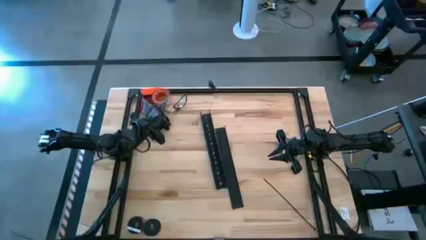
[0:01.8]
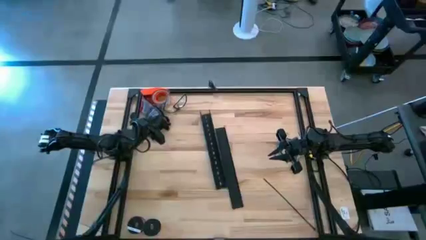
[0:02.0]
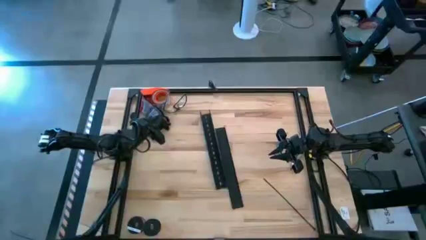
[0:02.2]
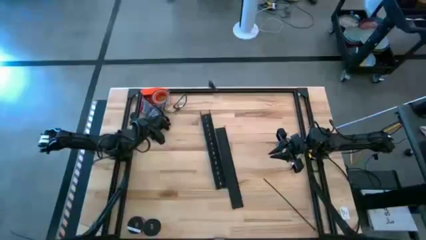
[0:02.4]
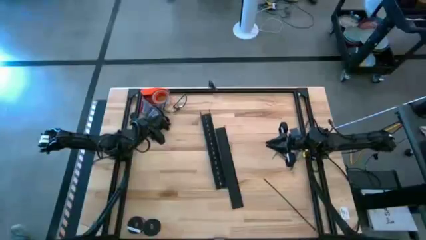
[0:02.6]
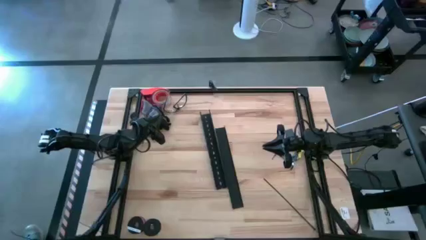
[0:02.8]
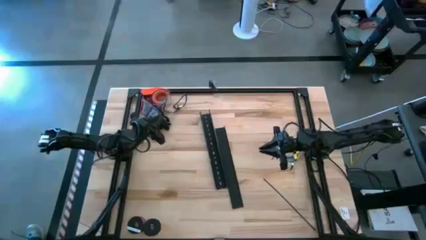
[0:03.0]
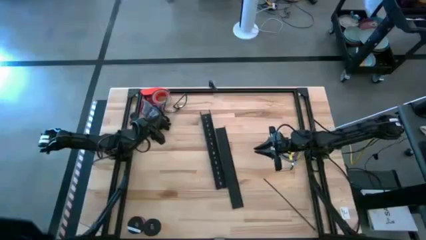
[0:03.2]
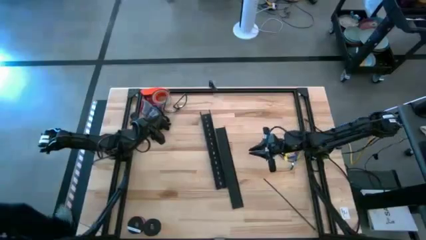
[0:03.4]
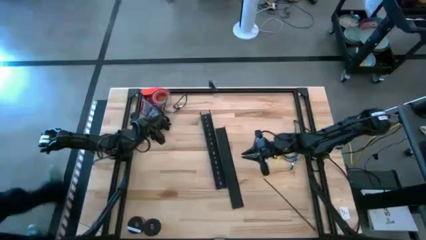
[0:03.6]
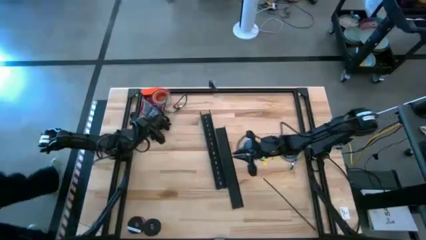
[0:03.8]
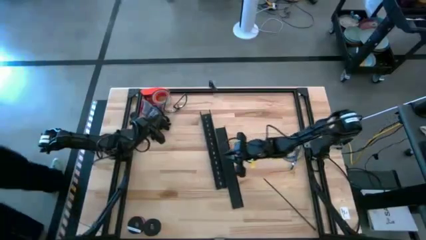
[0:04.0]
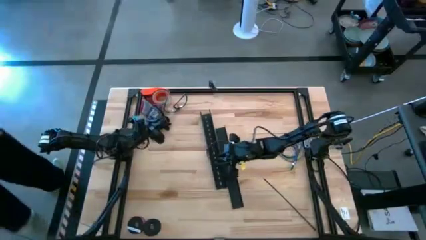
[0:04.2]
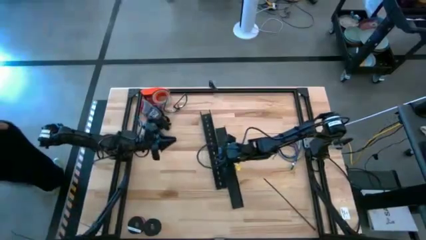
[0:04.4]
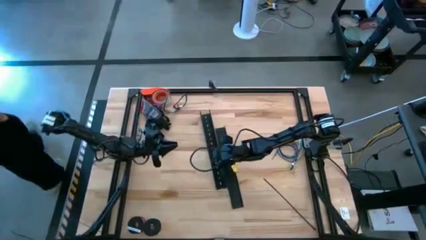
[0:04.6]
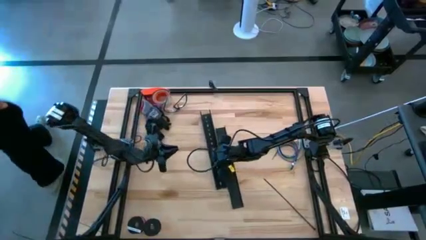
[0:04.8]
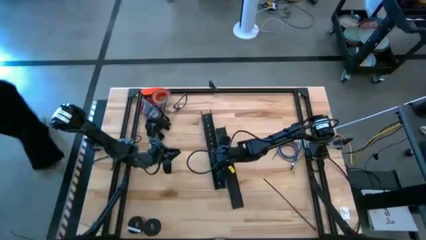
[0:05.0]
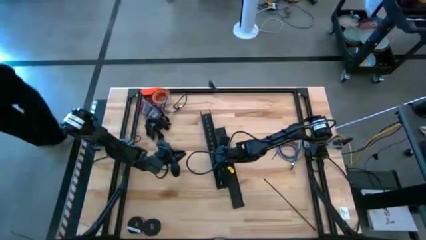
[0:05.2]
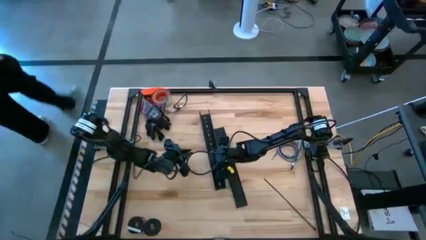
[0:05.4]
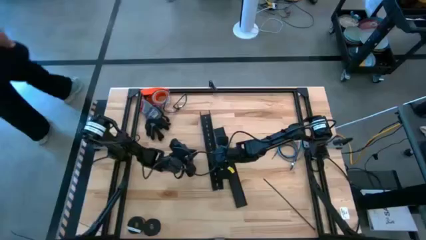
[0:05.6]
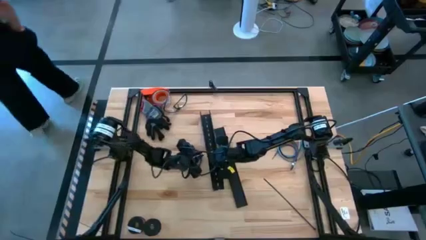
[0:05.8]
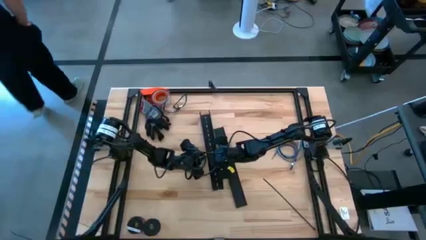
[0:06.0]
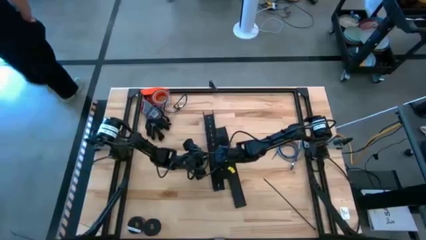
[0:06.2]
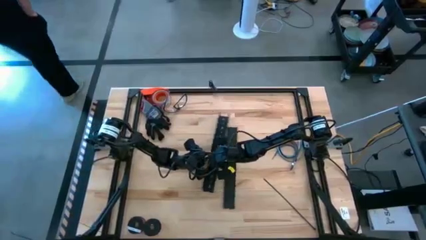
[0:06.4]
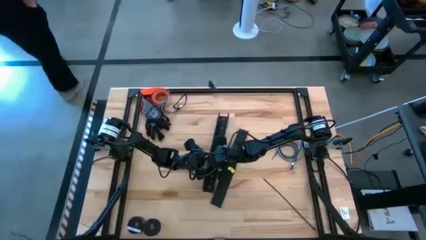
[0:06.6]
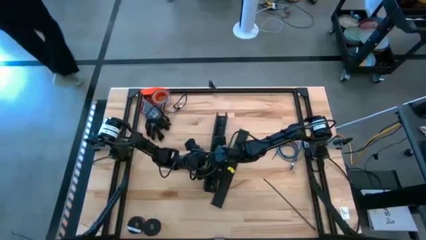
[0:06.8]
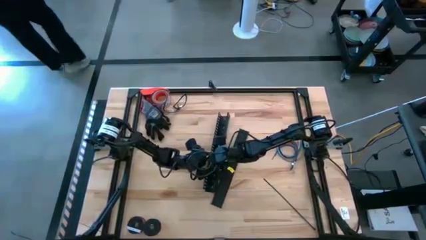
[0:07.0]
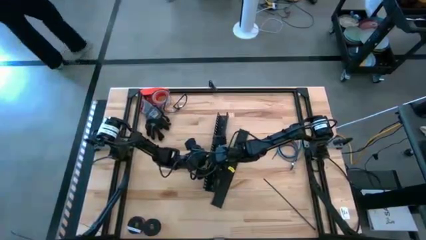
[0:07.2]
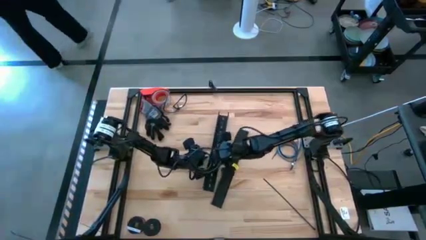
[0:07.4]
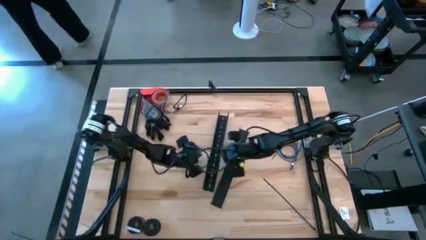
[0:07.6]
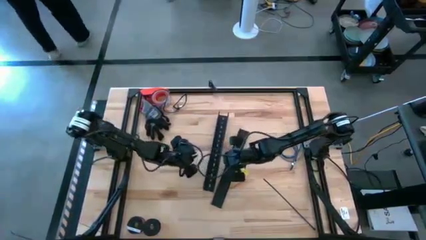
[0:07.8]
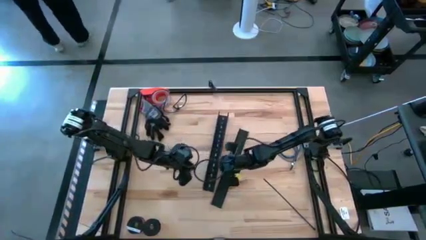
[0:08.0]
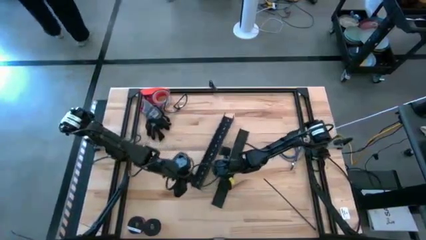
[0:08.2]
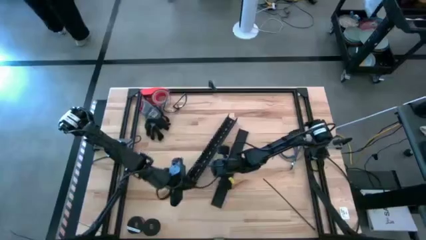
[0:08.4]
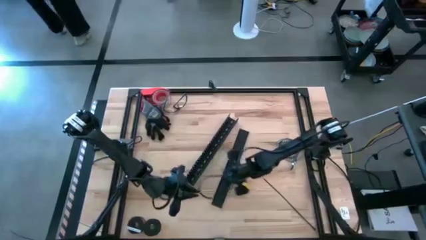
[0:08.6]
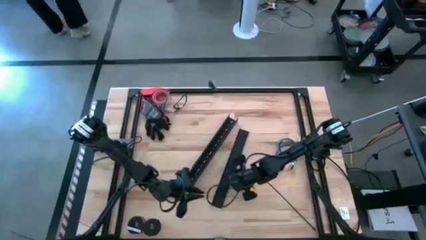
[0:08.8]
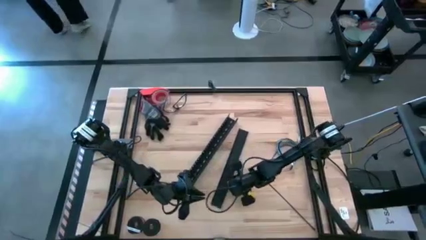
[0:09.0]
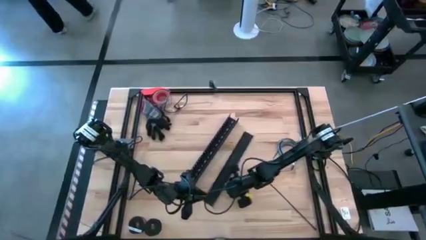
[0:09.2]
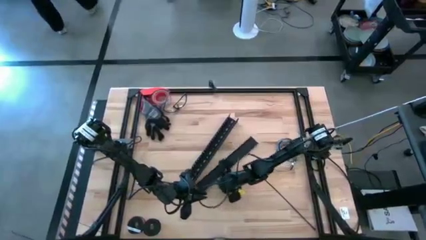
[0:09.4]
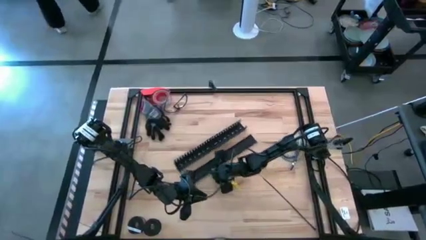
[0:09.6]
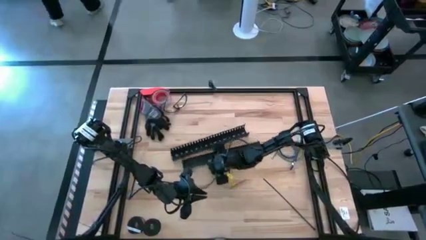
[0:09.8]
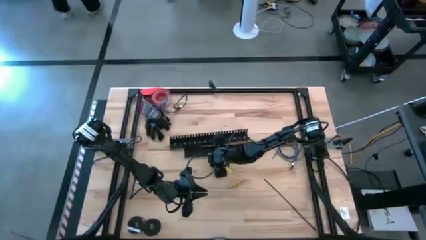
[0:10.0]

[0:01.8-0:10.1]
Task: Ziptie cables
Prepare the black cable duct

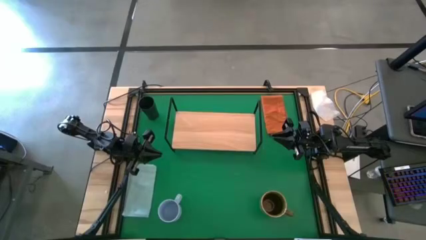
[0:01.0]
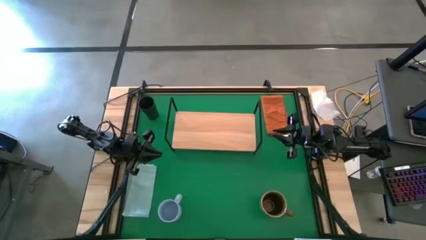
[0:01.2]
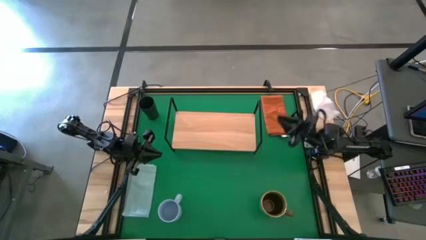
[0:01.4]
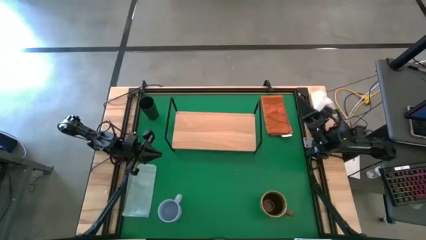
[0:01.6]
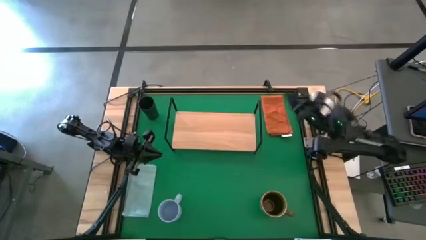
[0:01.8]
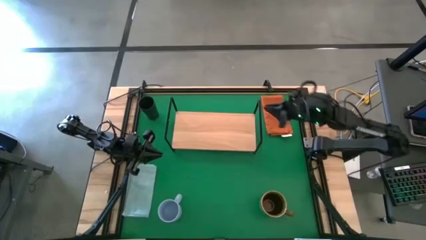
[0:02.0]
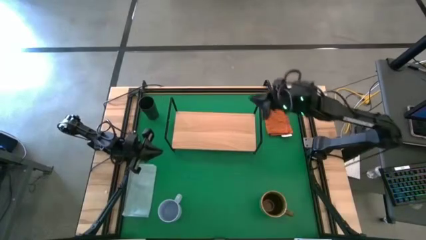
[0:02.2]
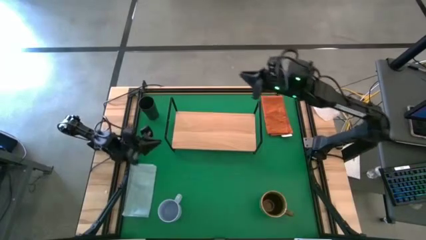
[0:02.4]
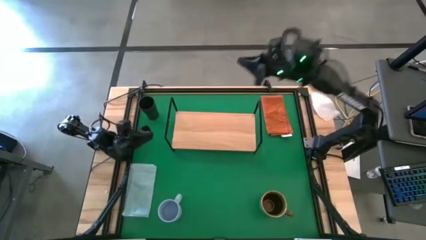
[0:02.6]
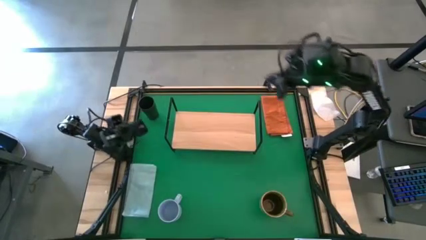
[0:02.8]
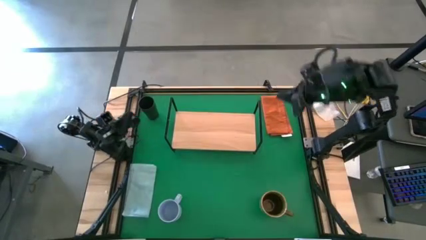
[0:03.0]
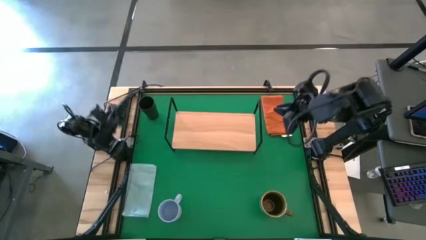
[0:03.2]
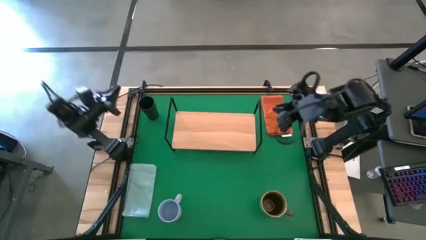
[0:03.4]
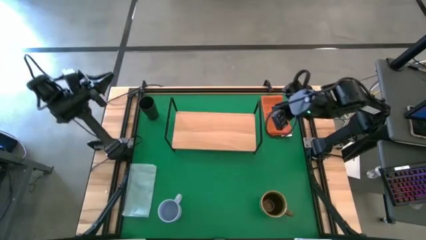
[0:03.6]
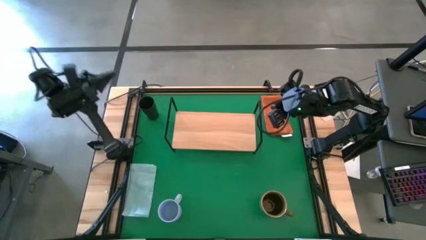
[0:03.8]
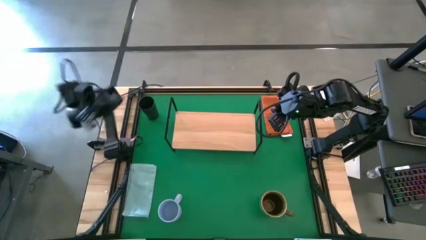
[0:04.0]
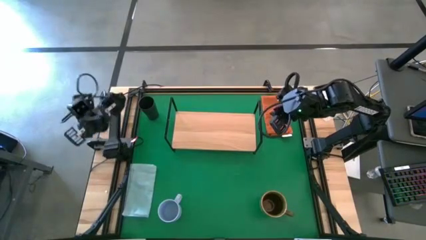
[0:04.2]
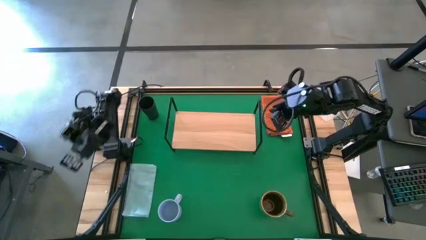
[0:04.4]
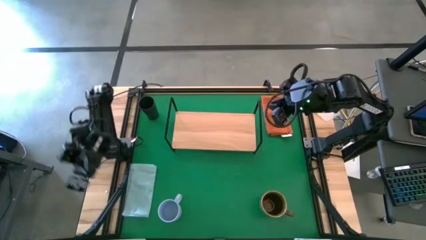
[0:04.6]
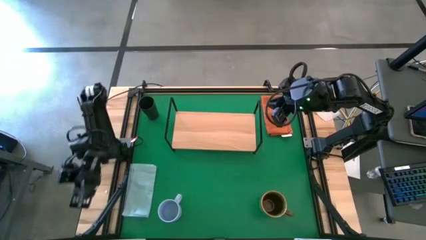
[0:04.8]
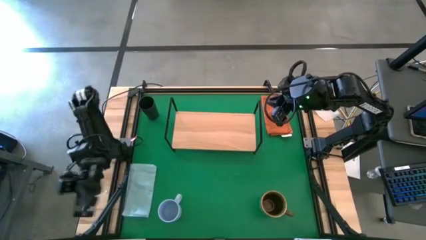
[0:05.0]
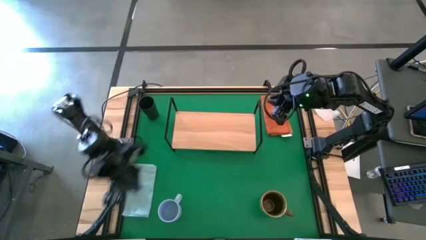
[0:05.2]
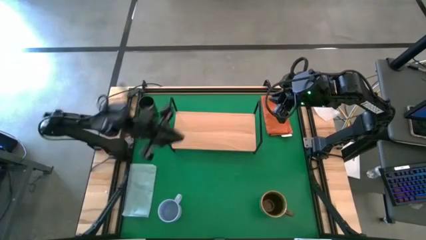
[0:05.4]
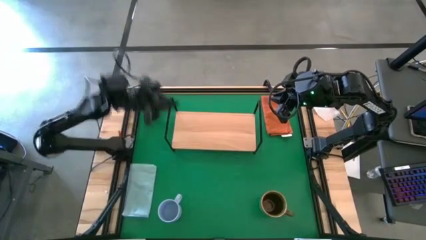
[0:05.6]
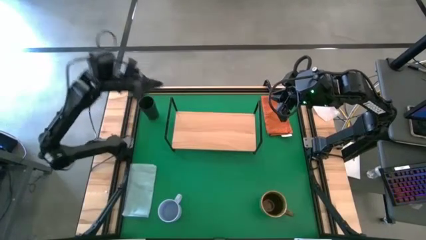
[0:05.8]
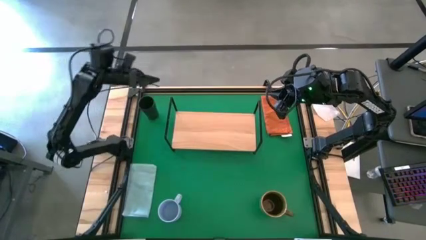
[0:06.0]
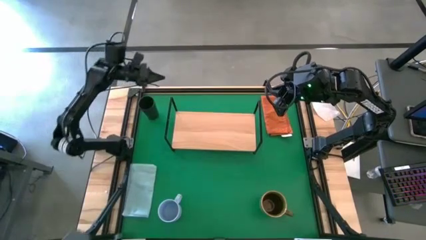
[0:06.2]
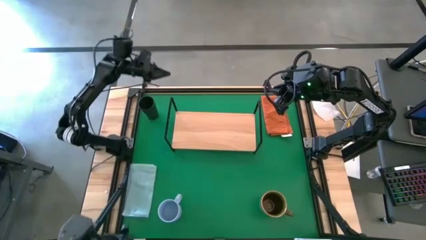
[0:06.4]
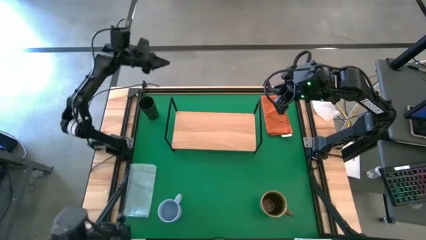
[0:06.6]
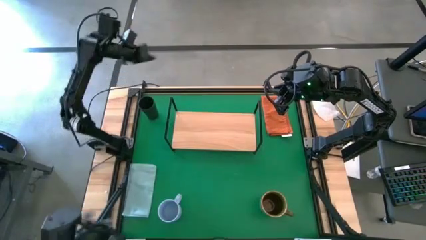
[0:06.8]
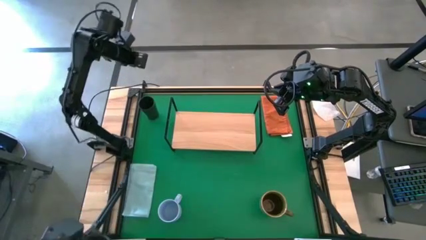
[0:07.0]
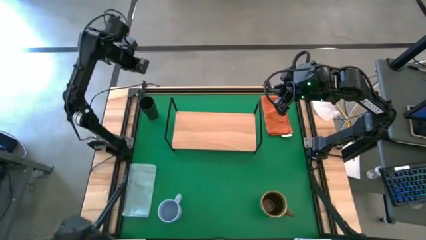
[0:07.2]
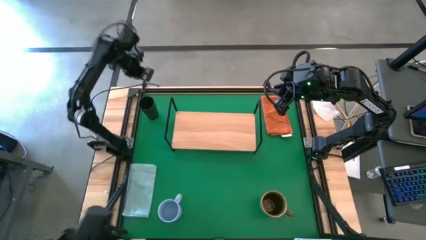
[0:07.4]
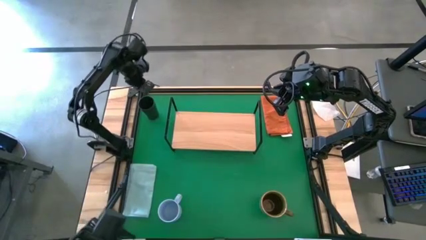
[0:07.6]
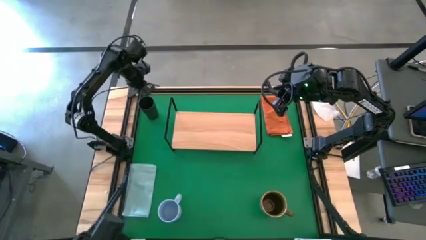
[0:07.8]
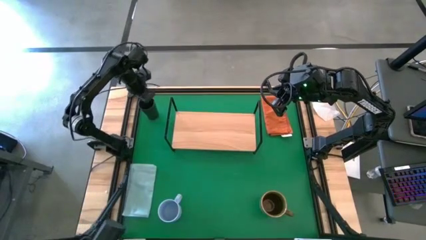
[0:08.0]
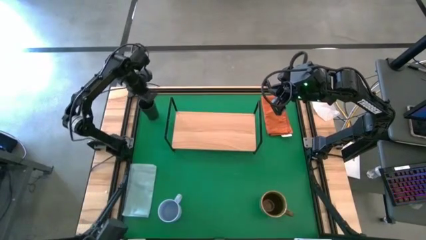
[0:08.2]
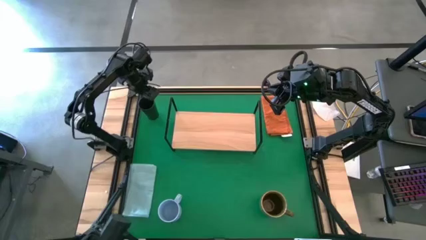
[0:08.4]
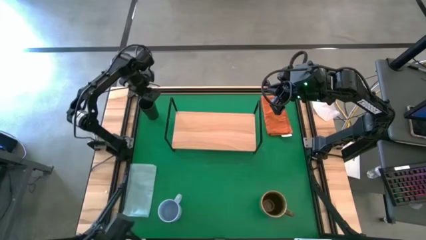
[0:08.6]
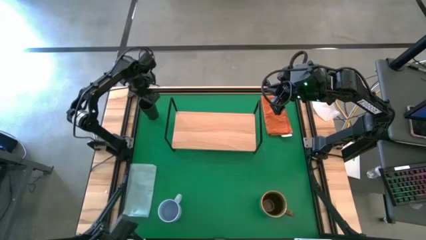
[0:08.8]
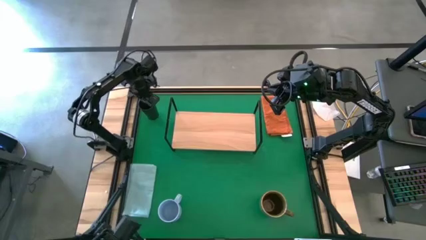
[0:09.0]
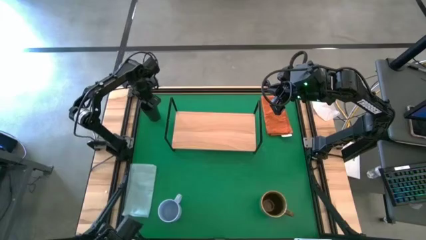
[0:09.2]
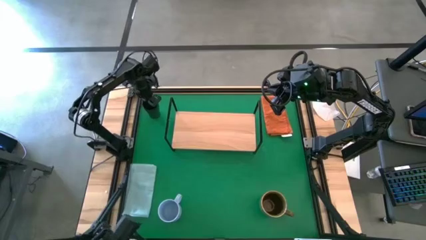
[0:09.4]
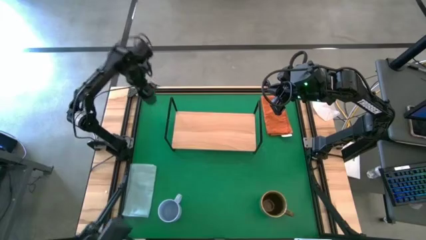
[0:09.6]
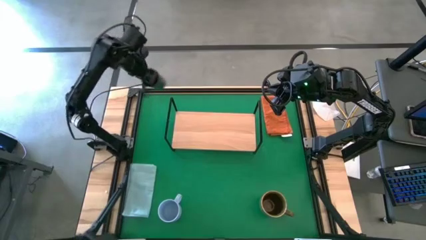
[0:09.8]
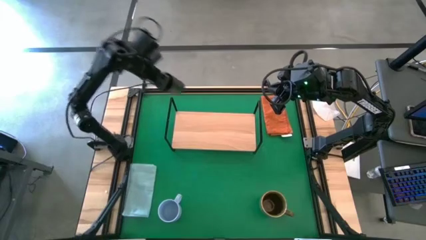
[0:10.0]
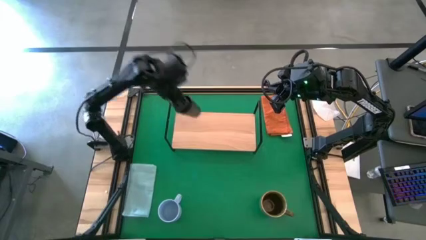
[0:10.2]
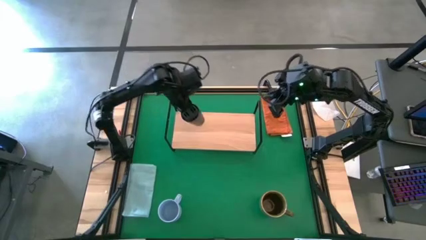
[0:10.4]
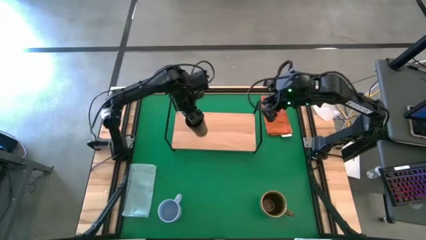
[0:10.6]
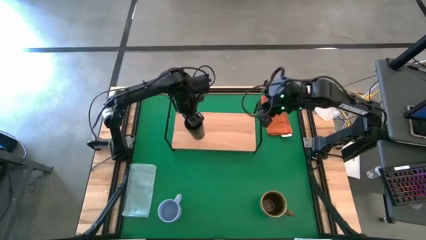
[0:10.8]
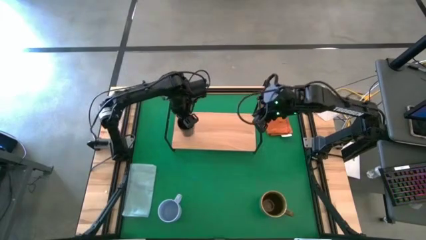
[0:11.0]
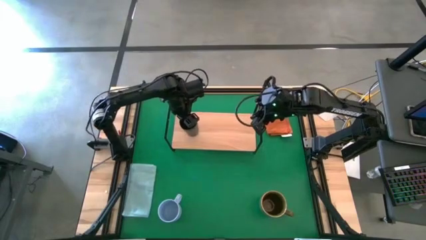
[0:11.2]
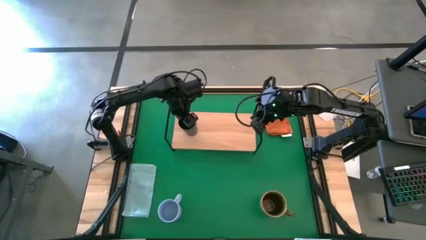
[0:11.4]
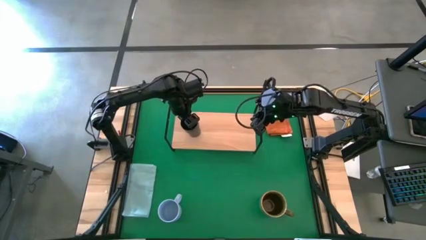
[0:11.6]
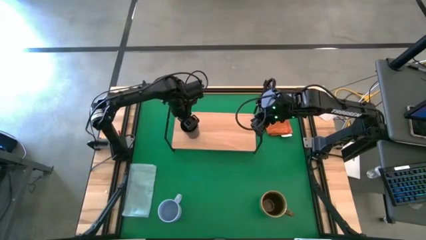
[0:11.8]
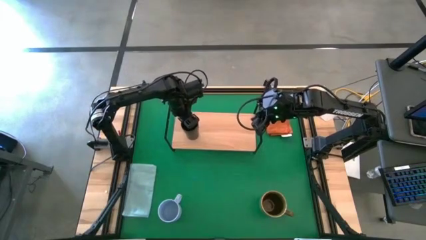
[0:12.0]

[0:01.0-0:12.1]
Task: Stack small to large cups/mugs on shelf
Put the black cup on the shelf
